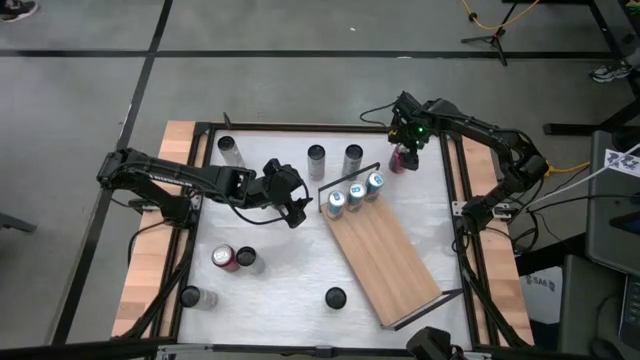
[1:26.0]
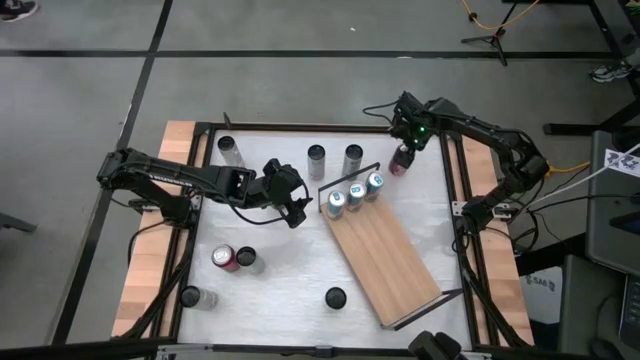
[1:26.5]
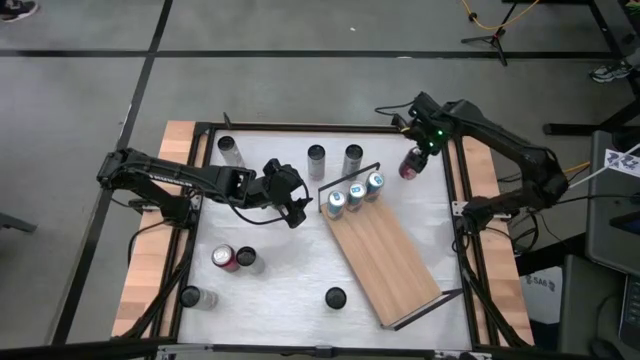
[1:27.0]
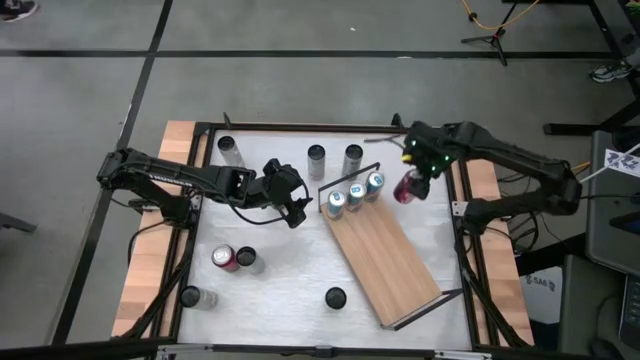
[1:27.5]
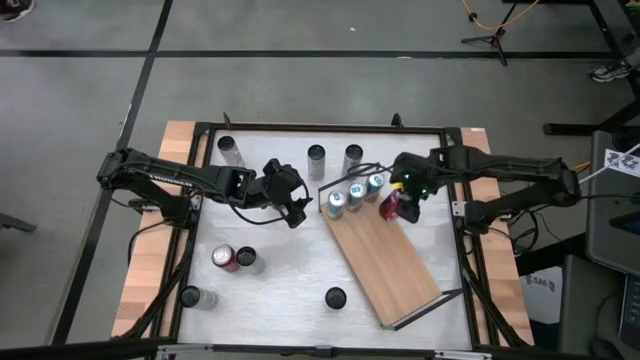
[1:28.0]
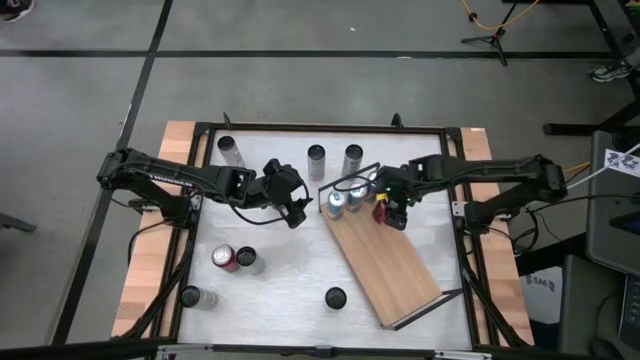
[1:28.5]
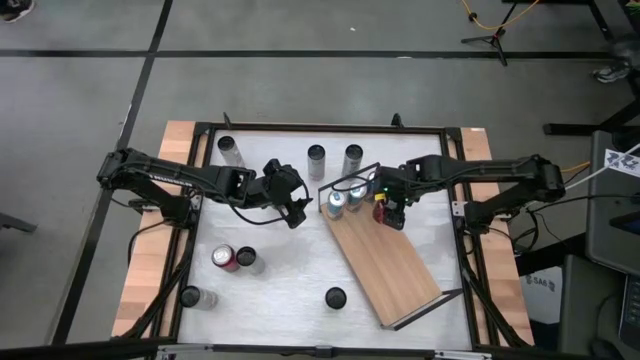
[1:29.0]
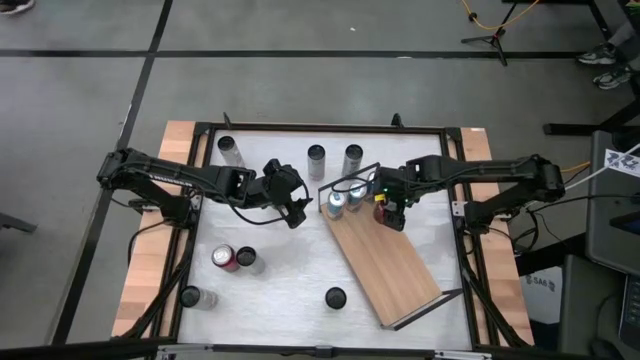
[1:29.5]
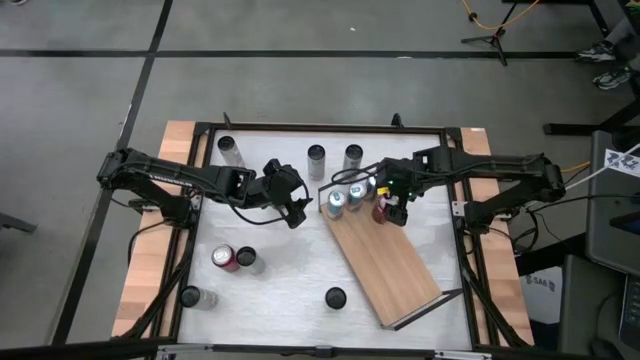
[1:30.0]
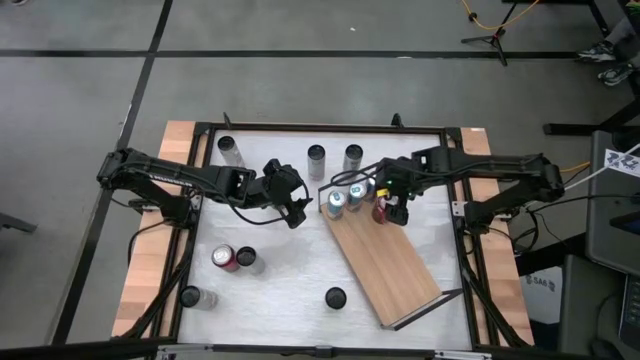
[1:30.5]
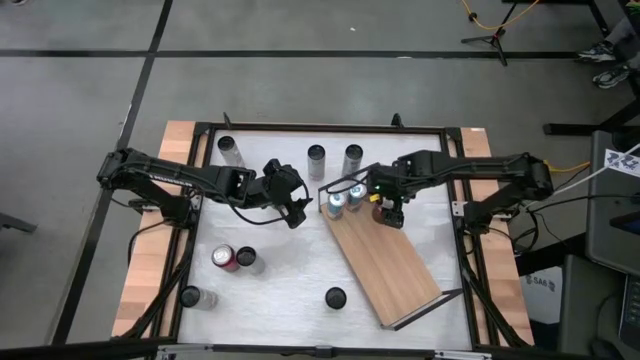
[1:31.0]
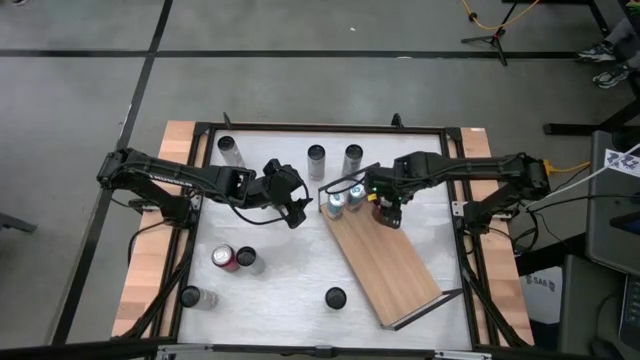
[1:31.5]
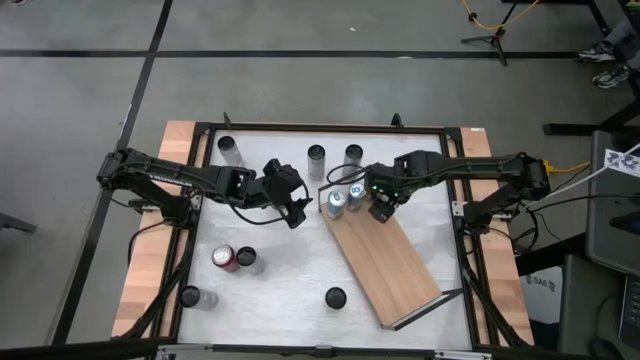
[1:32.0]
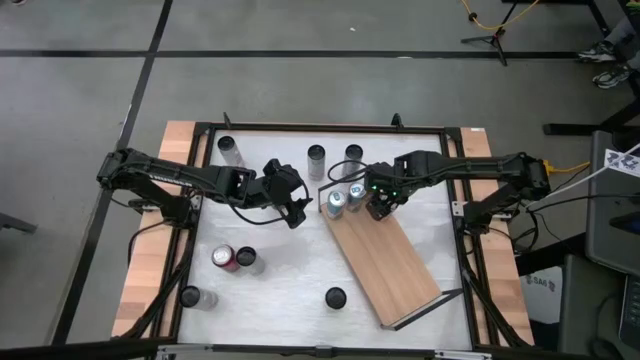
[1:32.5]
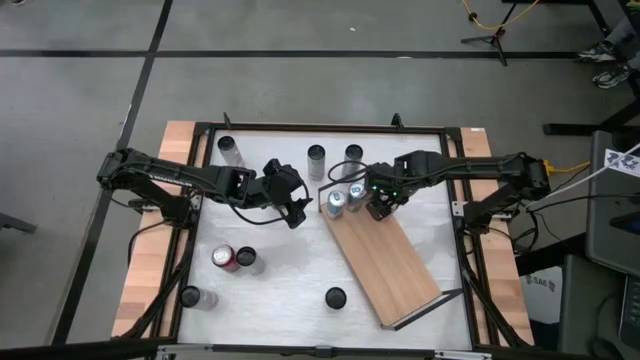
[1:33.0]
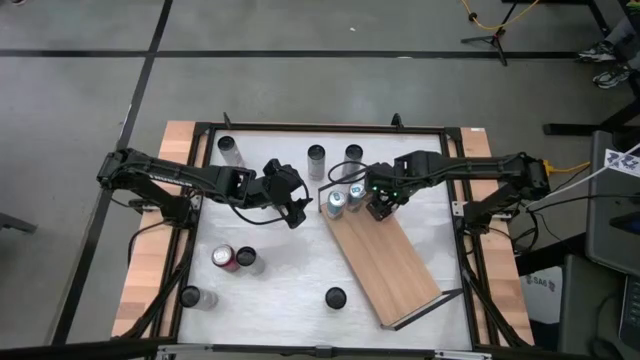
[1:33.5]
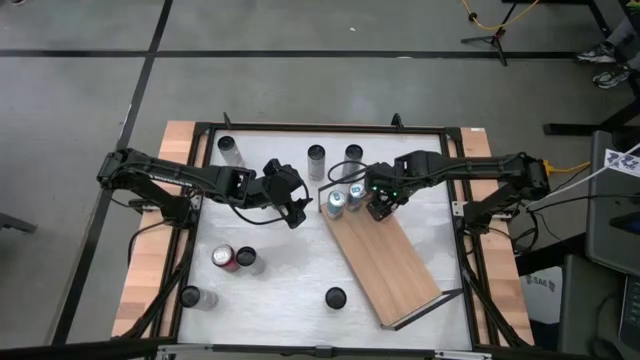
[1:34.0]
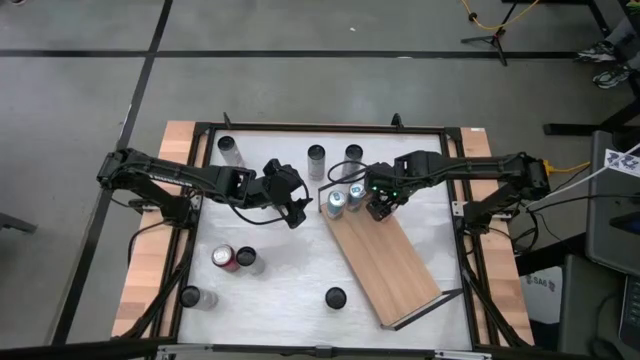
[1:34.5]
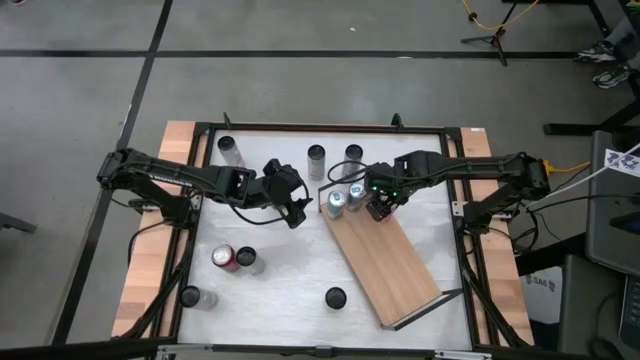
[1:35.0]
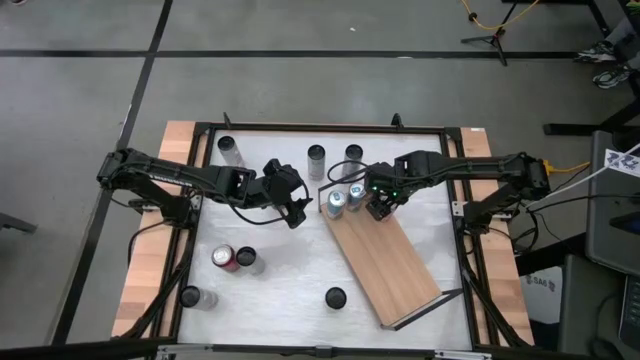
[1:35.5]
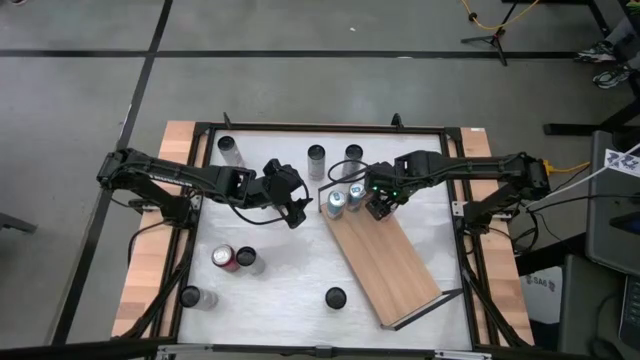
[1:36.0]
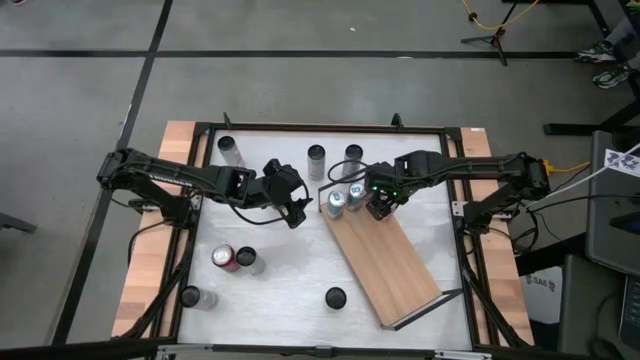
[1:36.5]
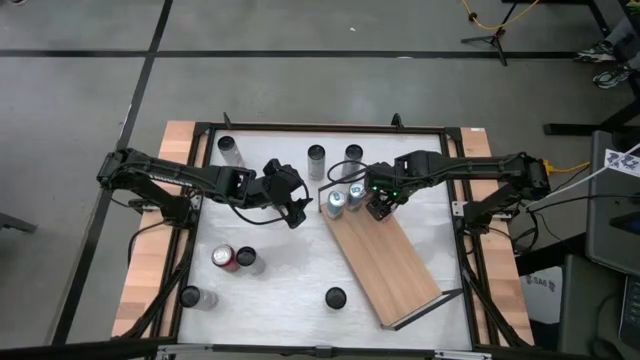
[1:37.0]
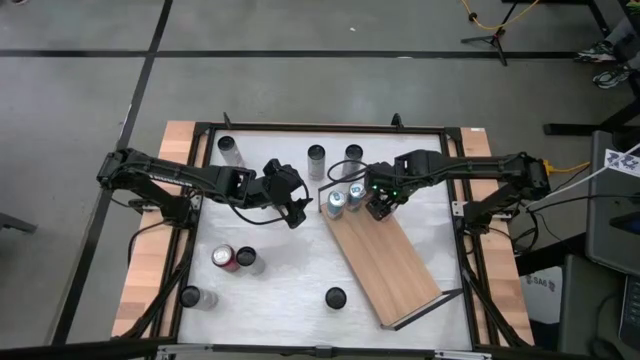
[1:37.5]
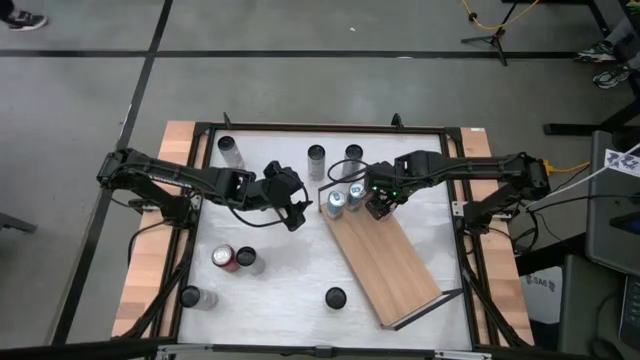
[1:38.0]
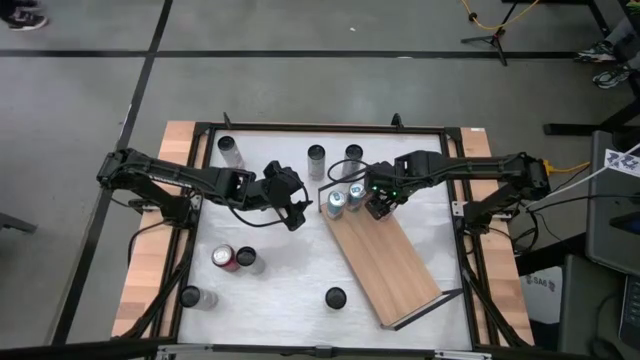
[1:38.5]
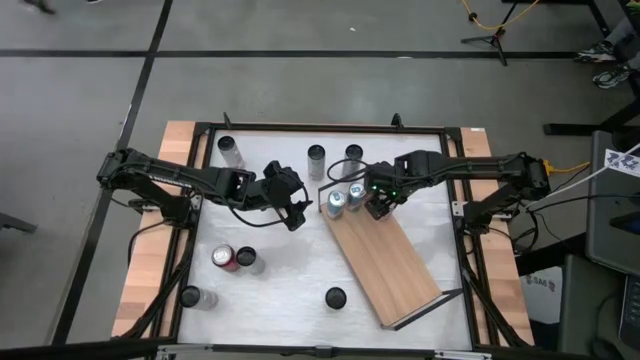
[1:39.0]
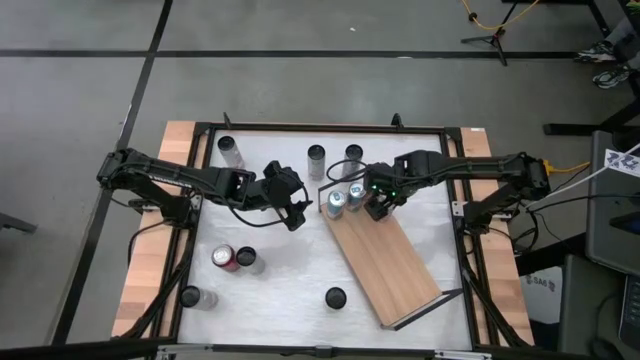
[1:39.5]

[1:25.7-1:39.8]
Task: Place canned beverage on shelf
Put the red soda can on the shelf

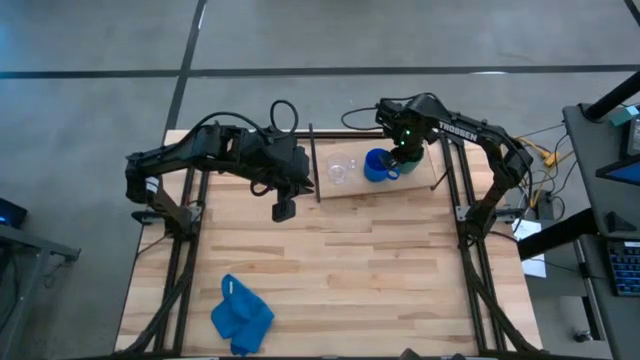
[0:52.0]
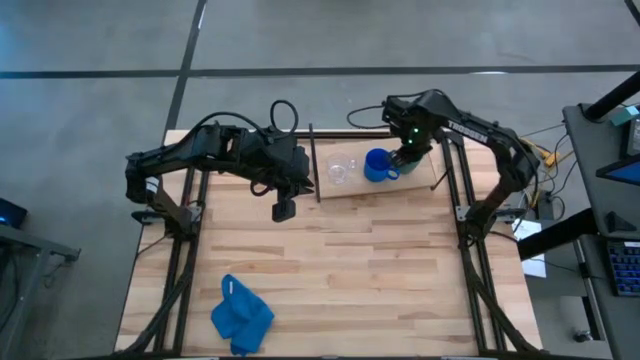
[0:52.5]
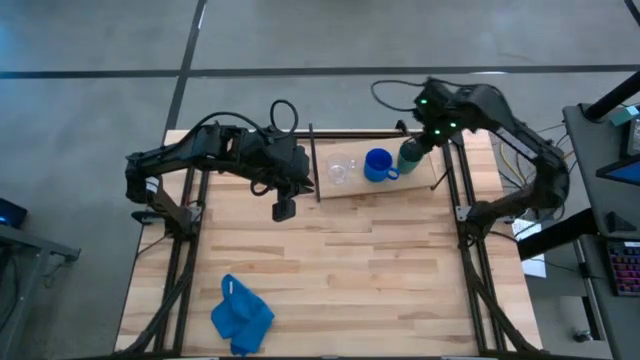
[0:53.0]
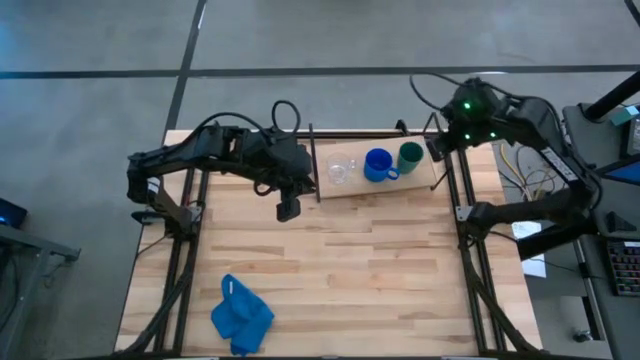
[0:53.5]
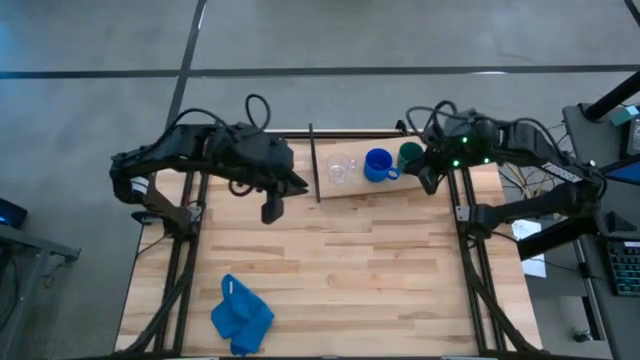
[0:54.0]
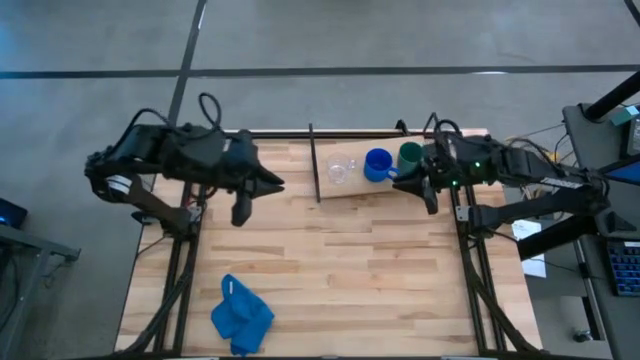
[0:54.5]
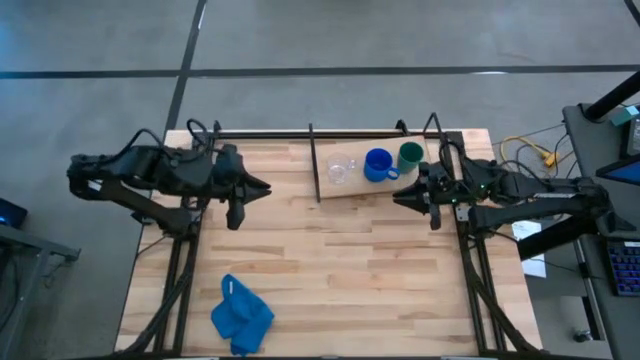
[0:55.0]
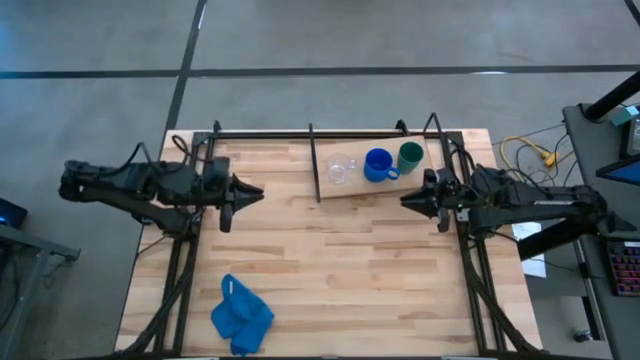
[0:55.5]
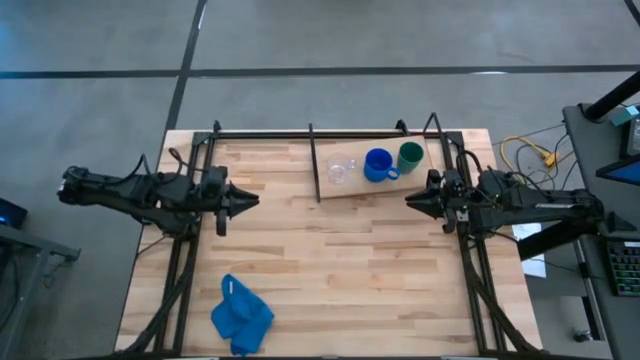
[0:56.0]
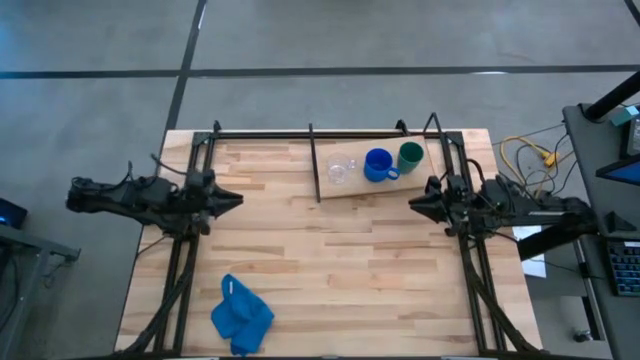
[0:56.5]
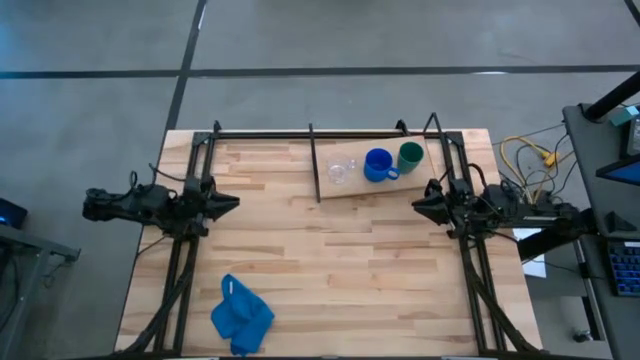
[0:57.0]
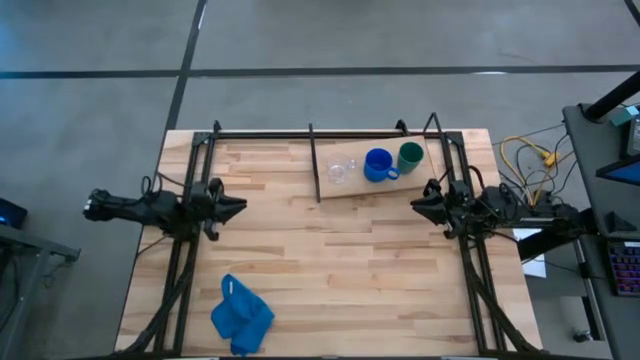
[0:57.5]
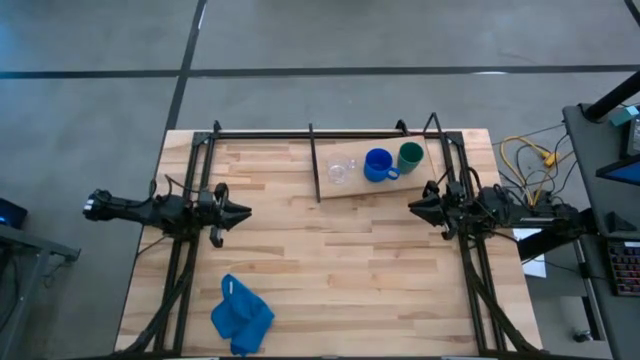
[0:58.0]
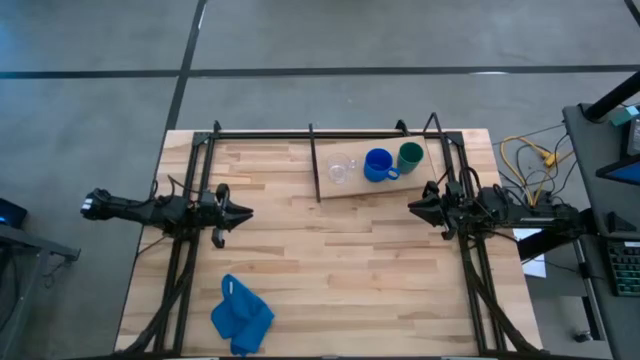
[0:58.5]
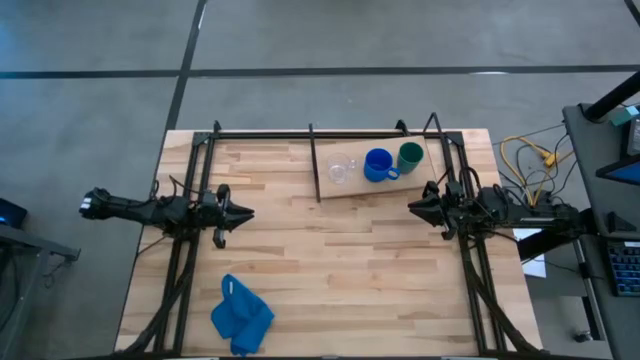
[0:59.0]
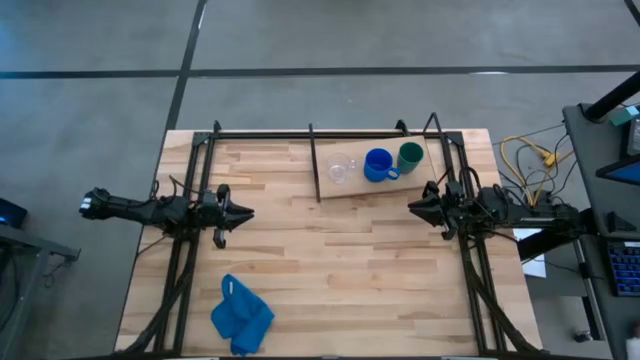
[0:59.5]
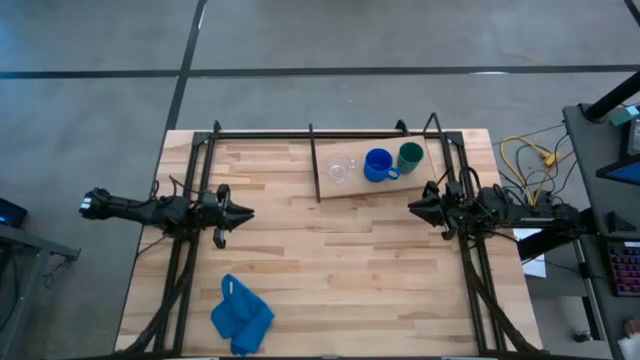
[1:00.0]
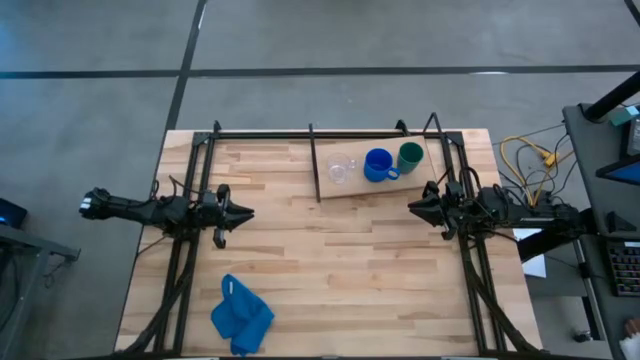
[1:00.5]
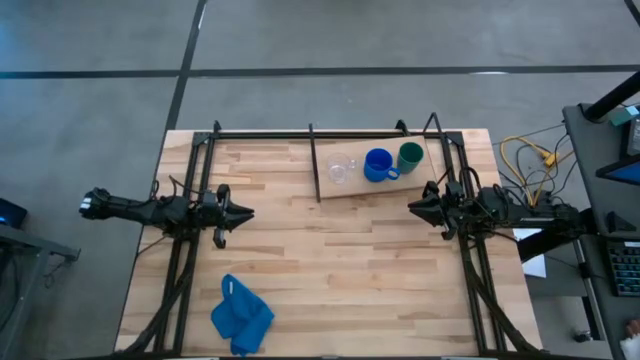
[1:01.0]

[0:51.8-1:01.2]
Task: Stack small to large cups/mugs on shelf
Return to Home Position
